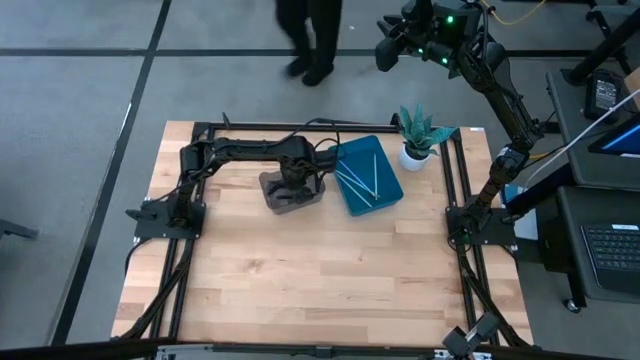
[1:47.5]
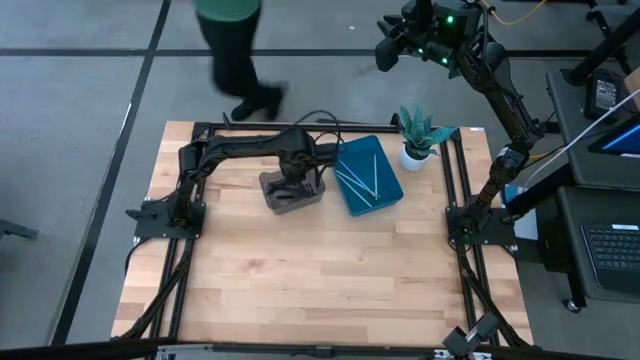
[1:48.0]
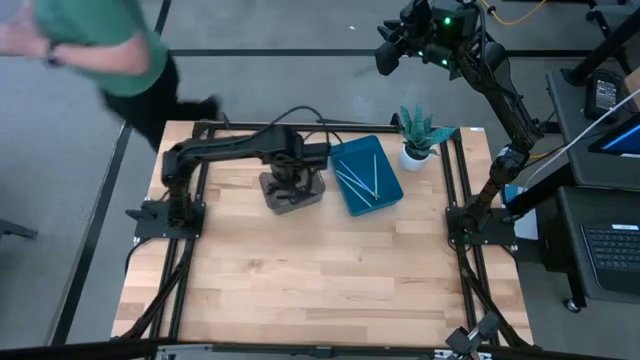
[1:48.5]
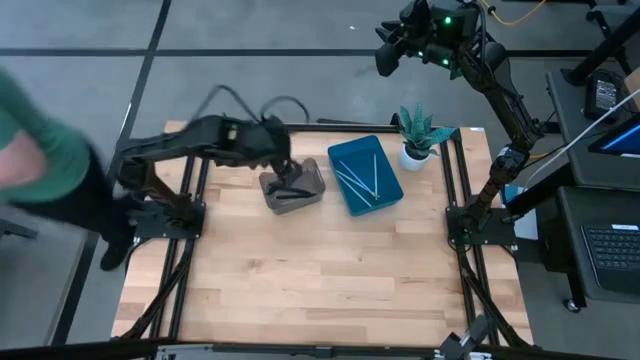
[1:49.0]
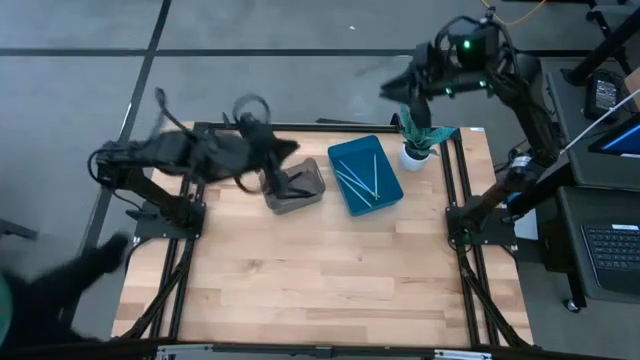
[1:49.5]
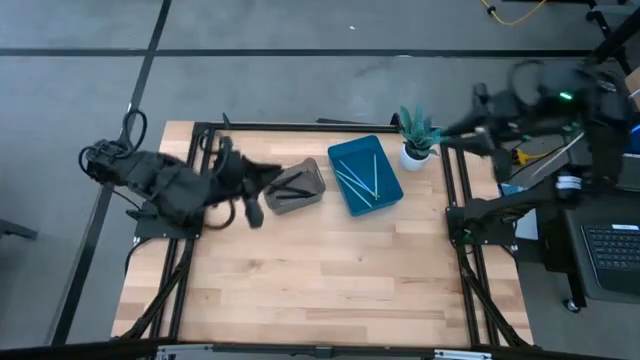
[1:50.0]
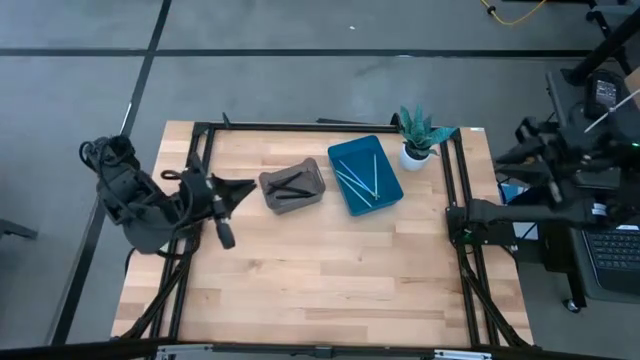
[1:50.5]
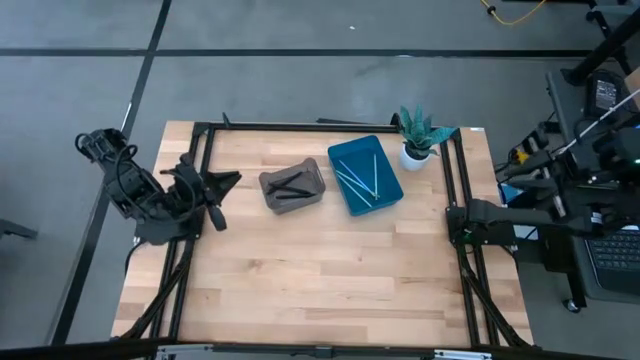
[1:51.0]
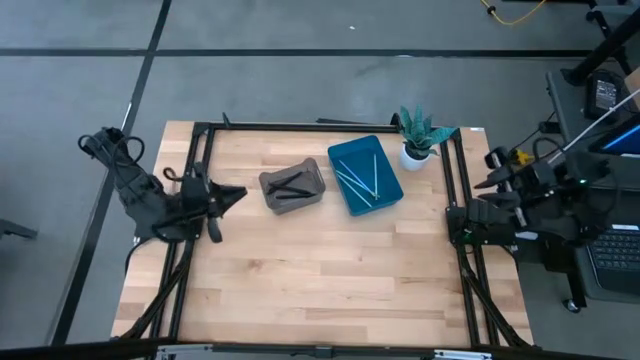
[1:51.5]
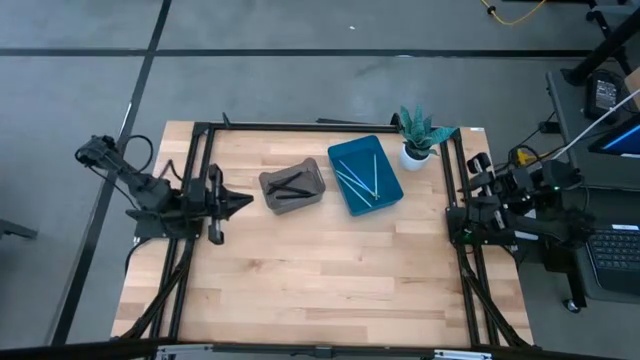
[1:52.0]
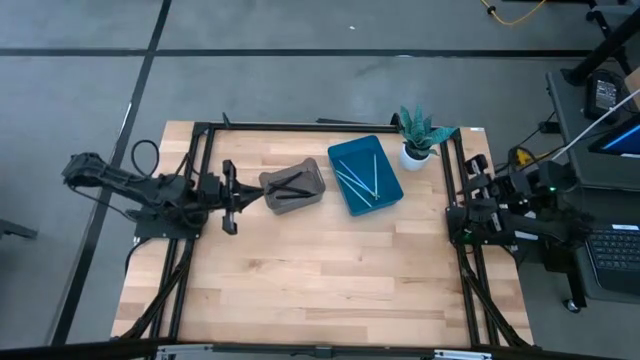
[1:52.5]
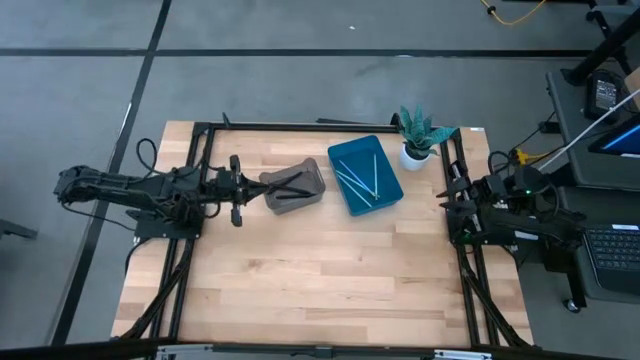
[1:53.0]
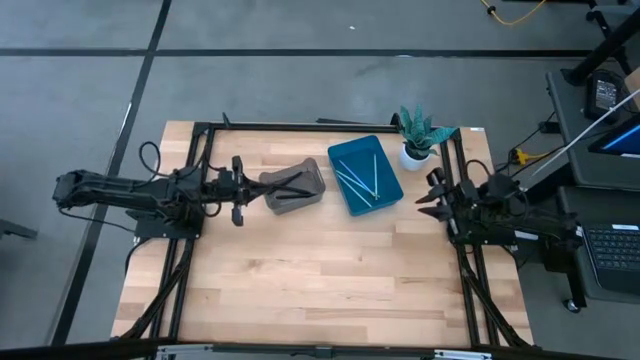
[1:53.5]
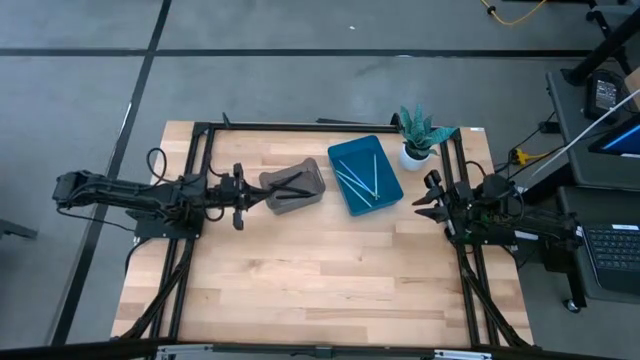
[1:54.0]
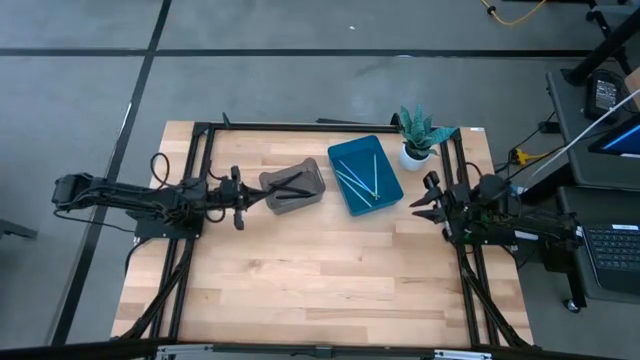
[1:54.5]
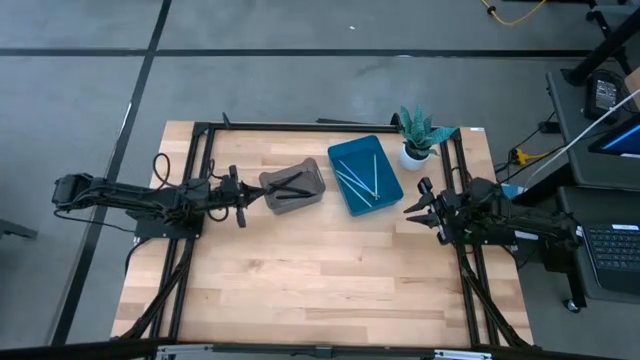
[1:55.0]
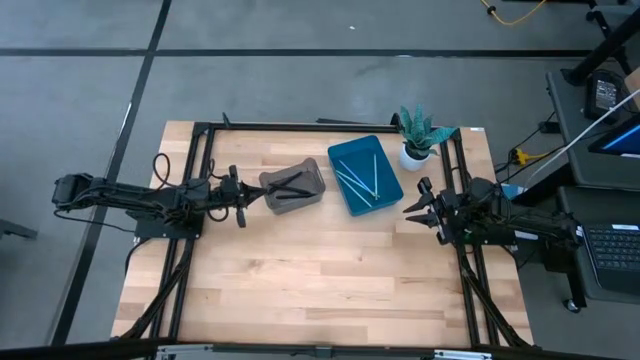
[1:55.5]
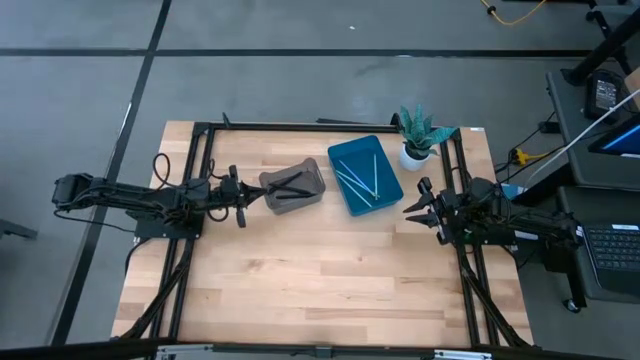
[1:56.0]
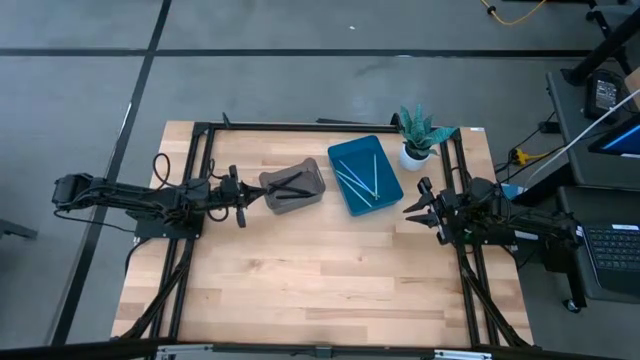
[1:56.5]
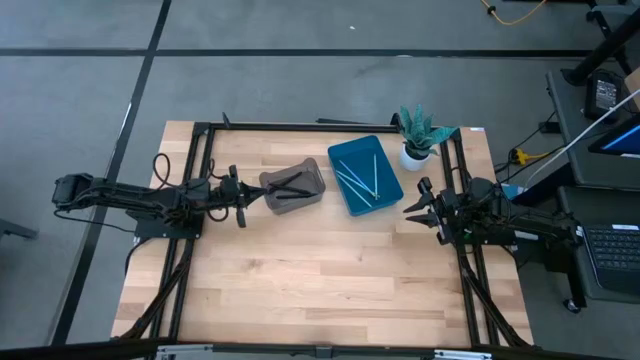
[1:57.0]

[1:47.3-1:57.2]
Task: Sort pens & pencils
Return to Home Position

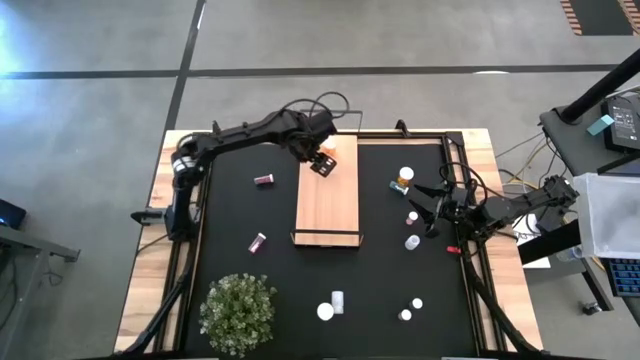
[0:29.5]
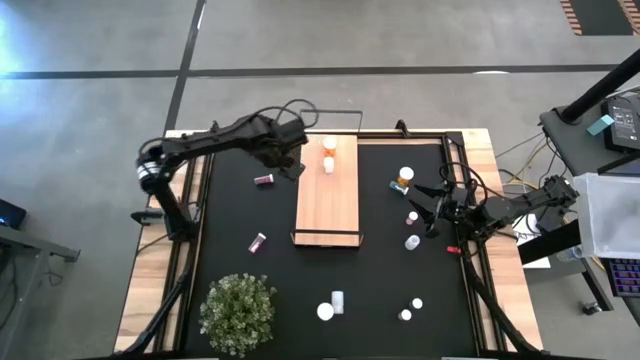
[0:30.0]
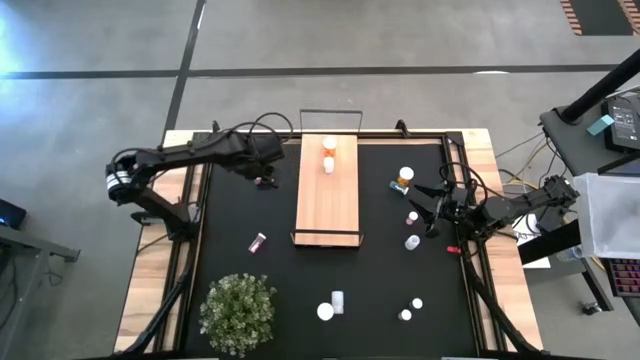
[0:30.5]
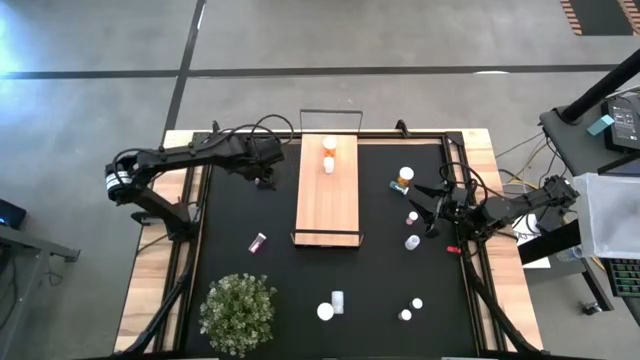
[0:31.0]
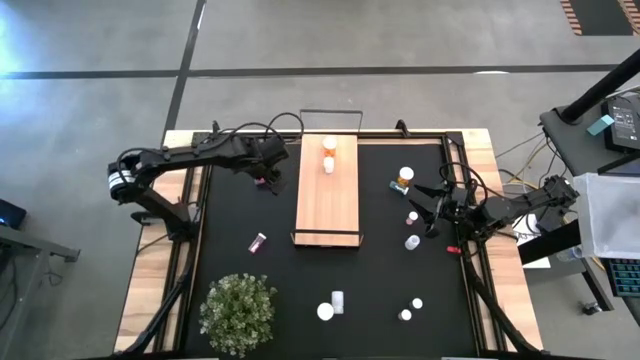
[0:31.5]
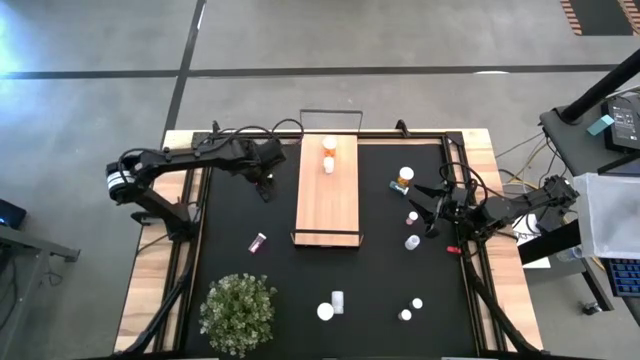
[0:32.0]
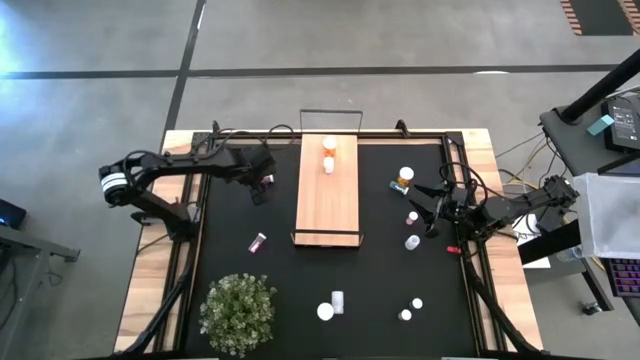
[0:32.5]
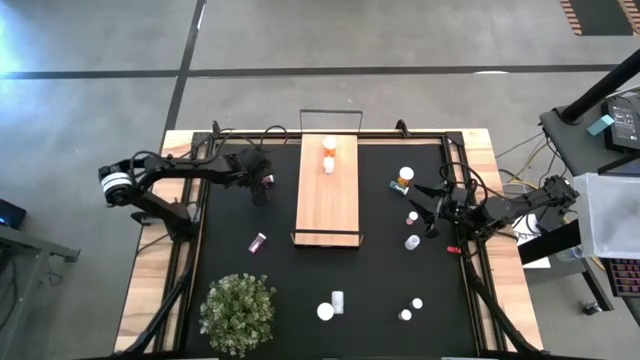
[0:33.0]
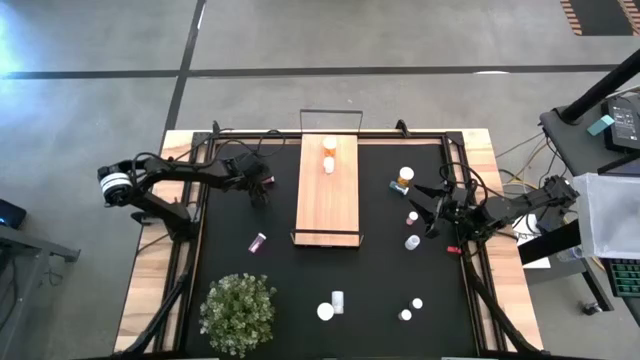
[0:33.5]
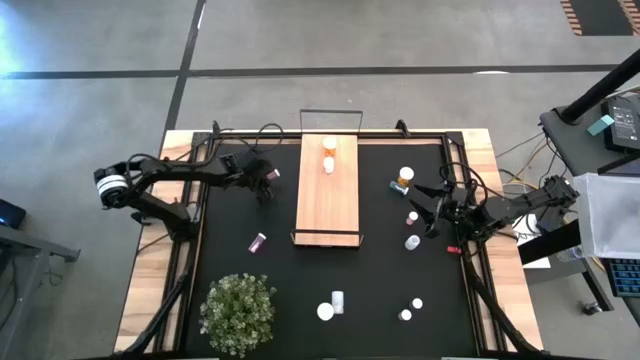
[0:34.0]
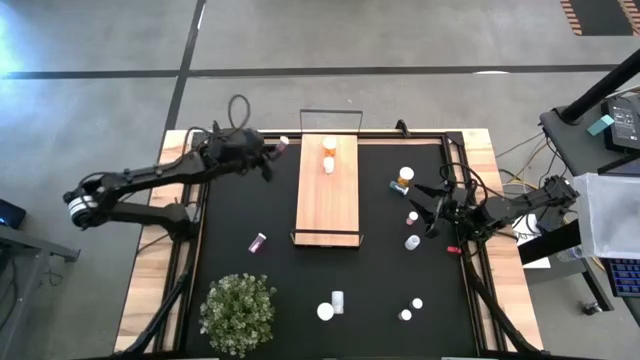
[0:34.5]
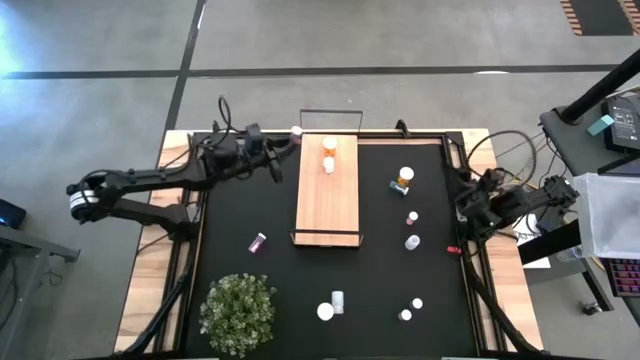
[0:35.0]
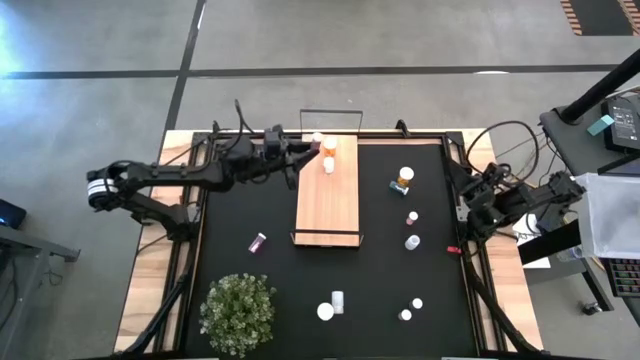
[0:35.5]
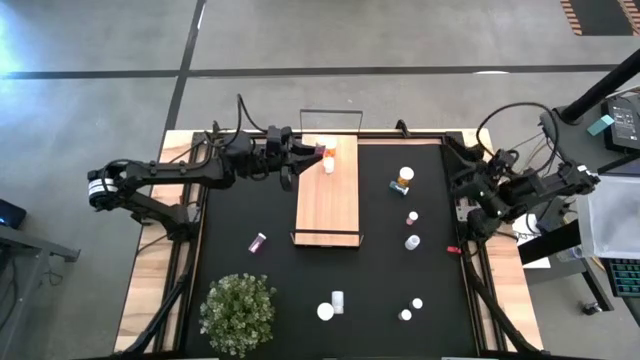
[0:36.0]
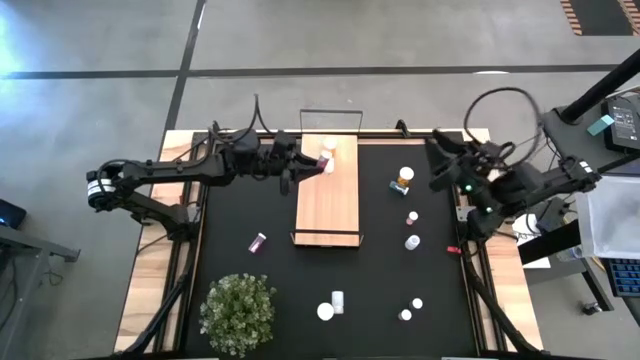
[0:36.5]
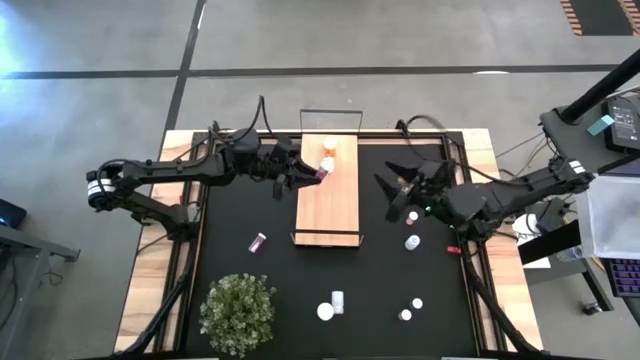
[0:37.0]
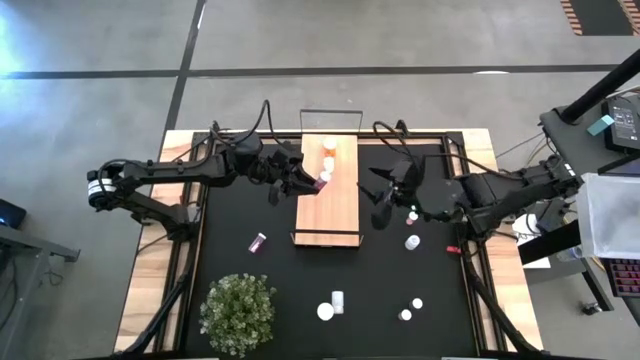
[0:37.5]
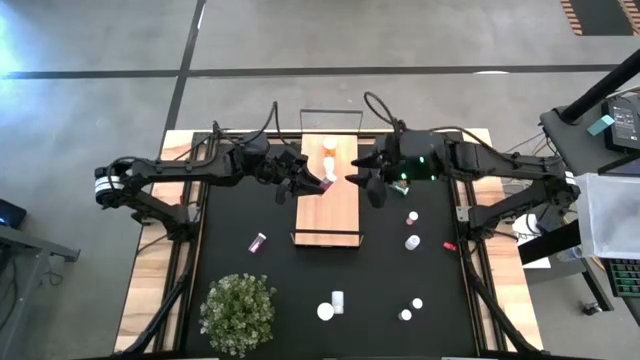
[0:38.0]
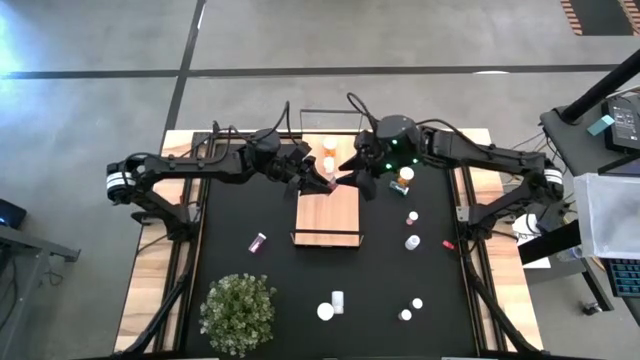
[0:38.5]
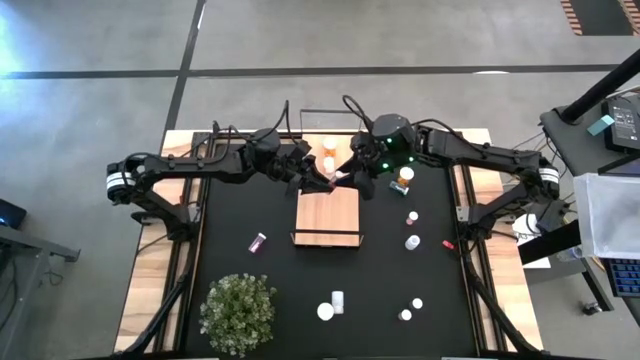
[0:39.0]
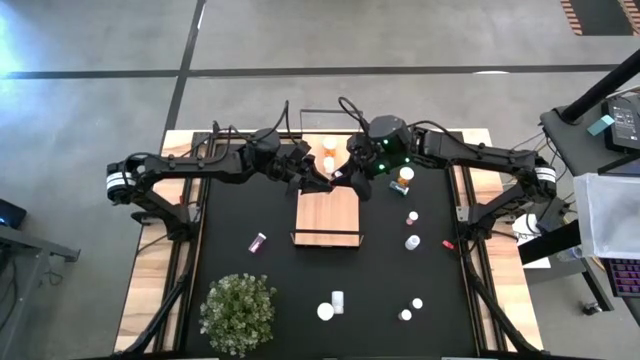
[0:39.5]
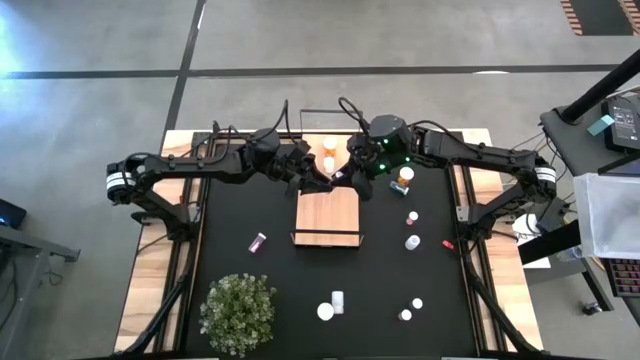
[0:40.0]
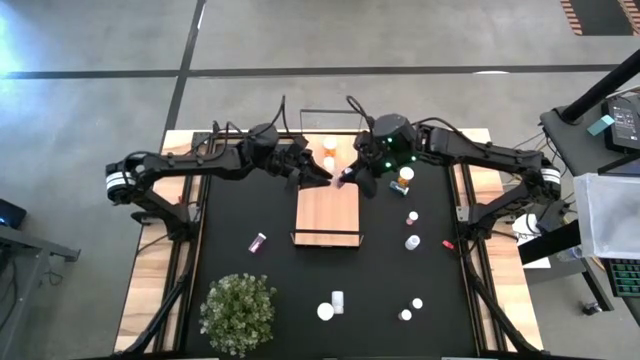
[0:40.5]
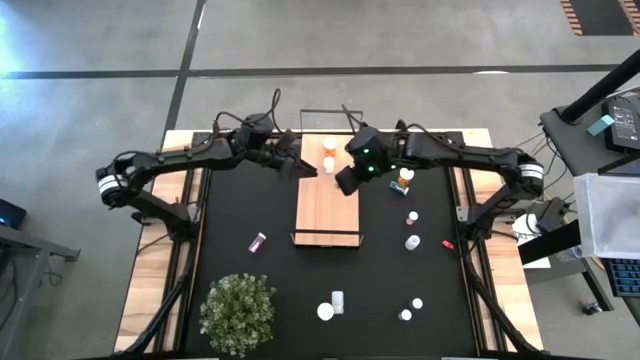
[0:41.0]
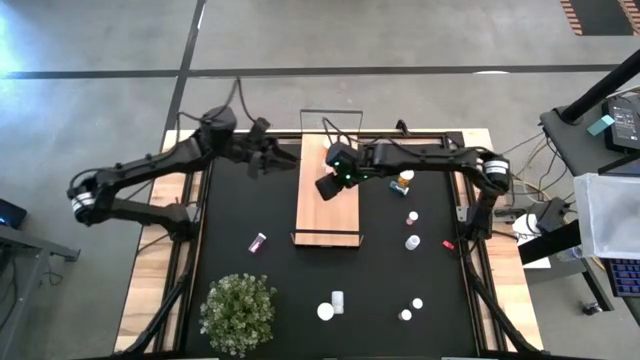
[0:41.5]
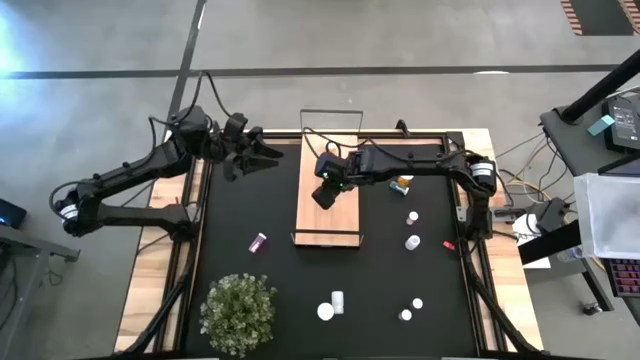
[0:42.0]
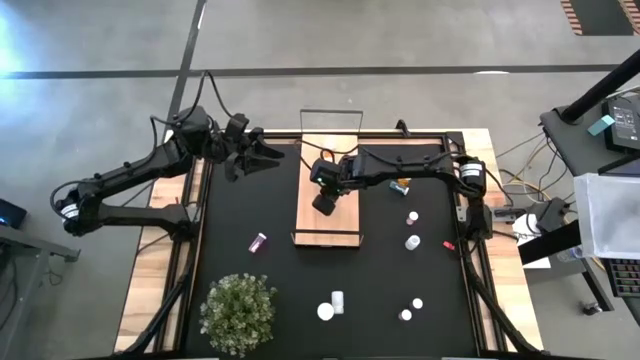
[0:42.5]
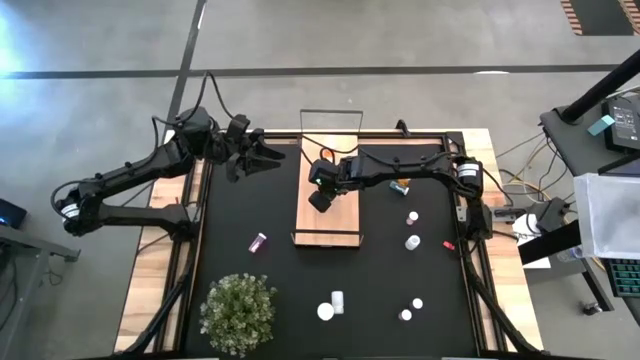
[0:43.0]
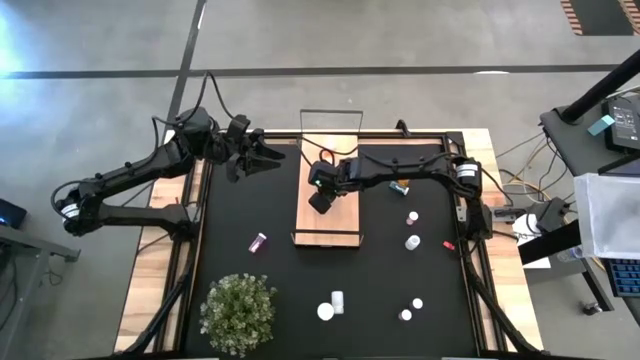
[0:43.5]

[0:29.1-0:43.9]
Task: Pick and place medicine bottles onto shelf by color
Put the top left blue pill bottle on the shelf
